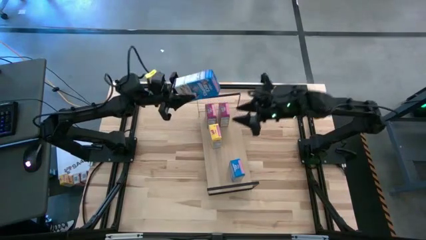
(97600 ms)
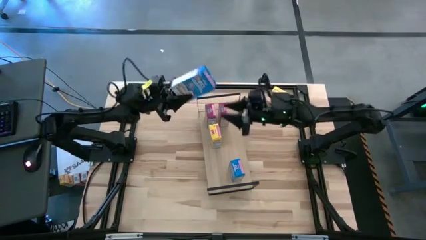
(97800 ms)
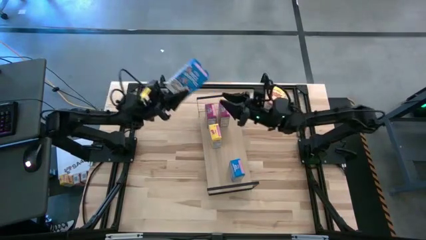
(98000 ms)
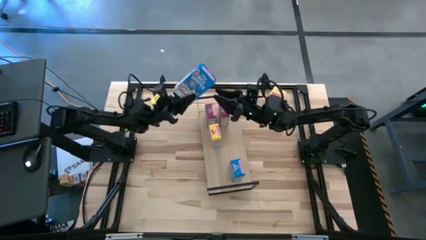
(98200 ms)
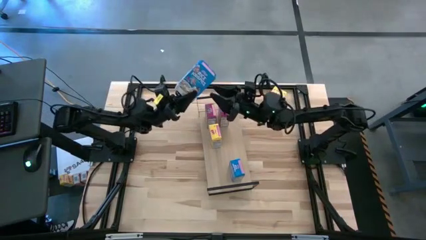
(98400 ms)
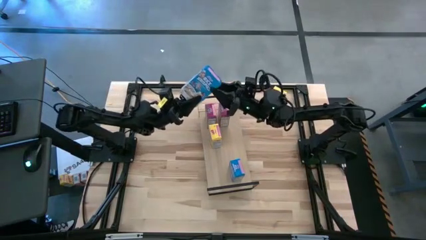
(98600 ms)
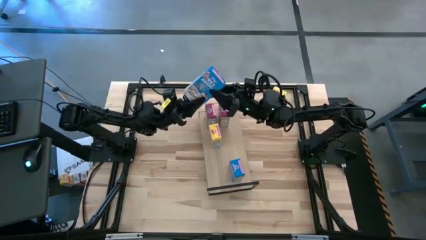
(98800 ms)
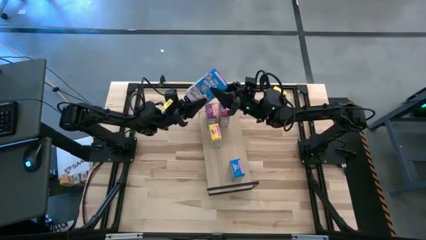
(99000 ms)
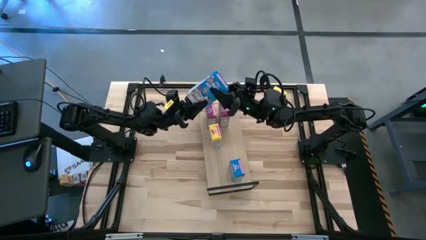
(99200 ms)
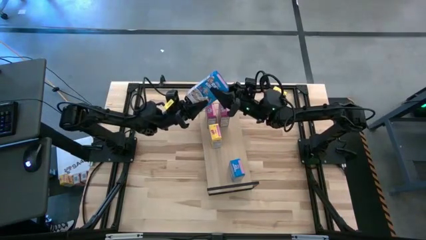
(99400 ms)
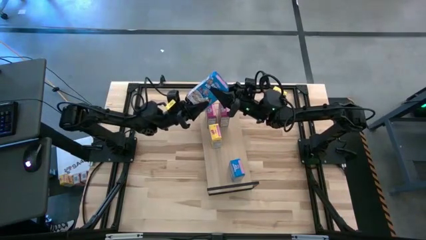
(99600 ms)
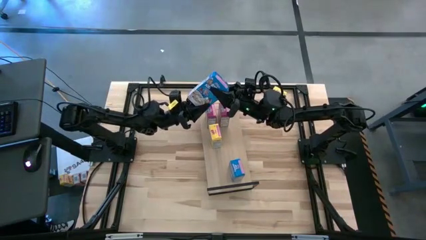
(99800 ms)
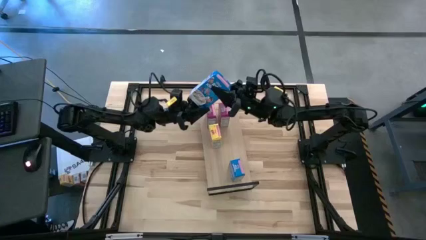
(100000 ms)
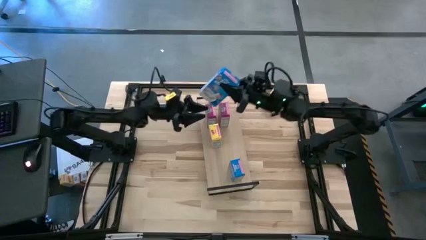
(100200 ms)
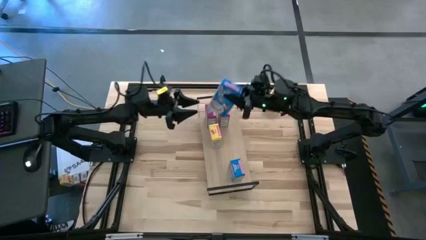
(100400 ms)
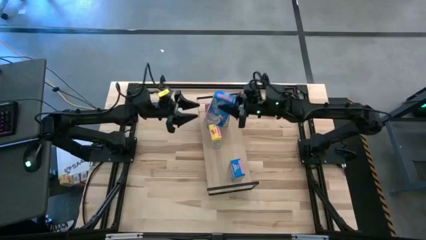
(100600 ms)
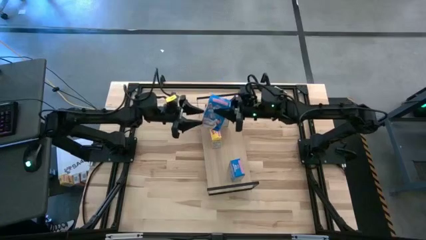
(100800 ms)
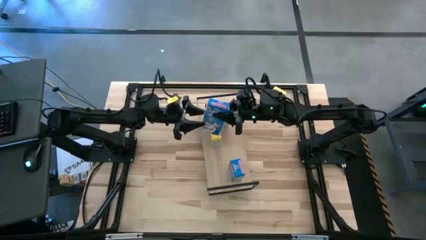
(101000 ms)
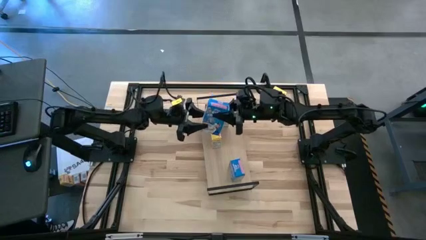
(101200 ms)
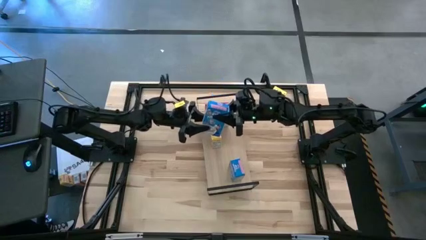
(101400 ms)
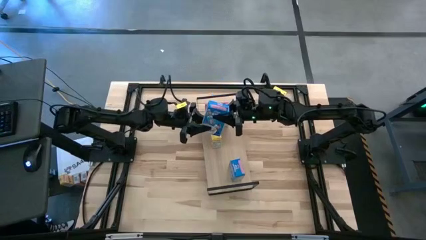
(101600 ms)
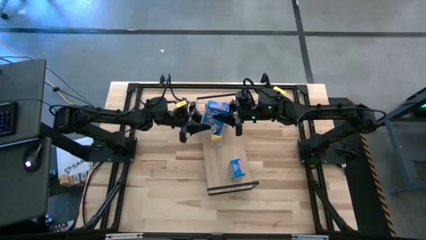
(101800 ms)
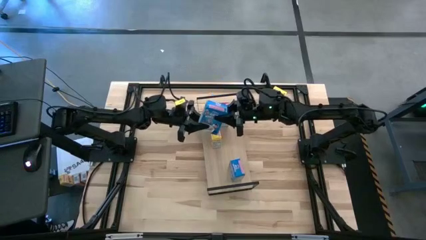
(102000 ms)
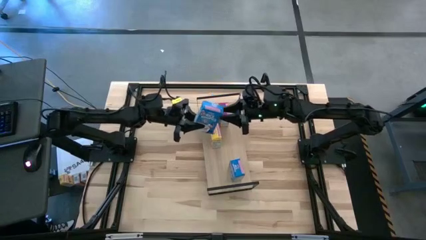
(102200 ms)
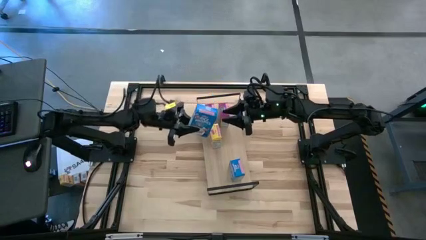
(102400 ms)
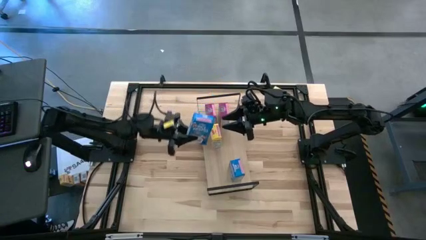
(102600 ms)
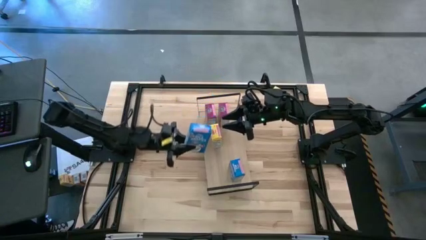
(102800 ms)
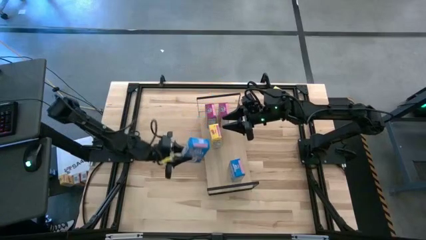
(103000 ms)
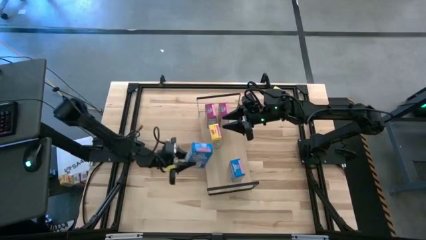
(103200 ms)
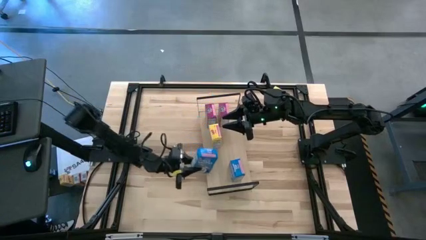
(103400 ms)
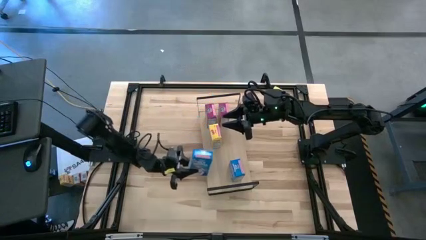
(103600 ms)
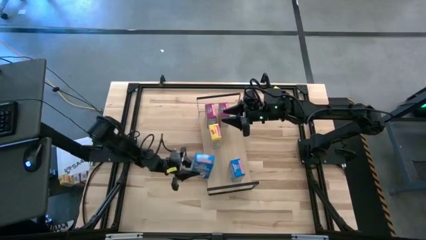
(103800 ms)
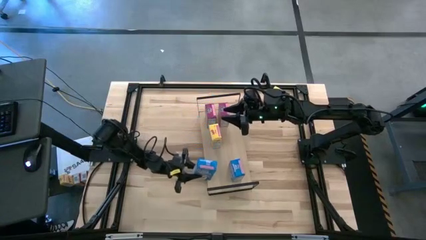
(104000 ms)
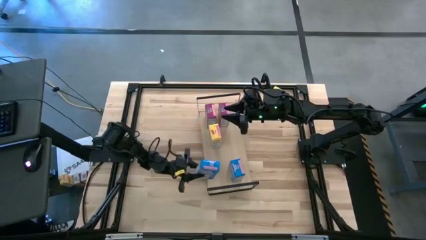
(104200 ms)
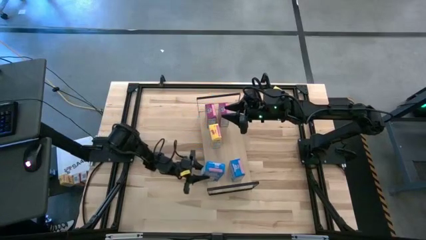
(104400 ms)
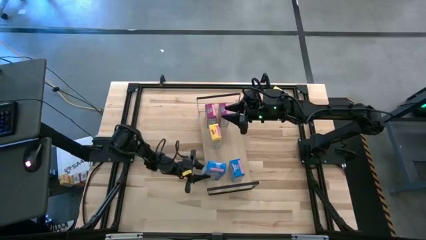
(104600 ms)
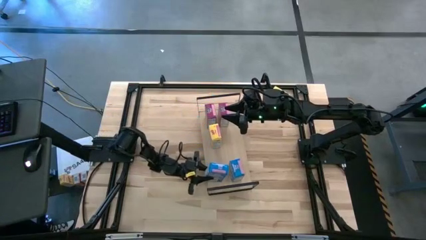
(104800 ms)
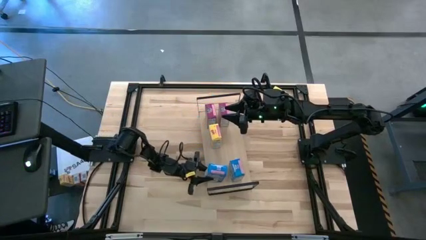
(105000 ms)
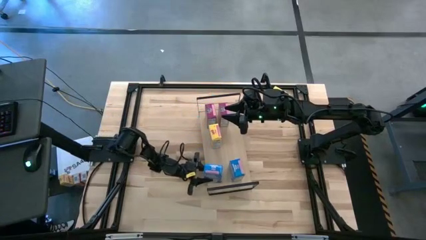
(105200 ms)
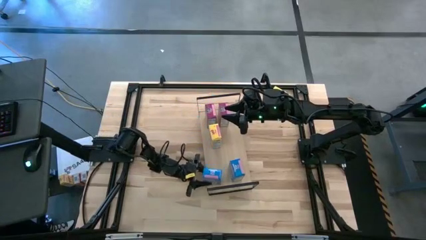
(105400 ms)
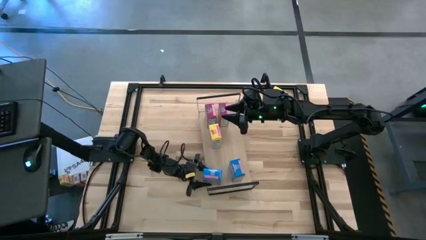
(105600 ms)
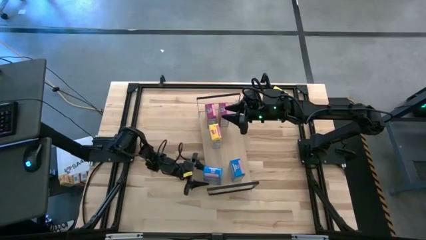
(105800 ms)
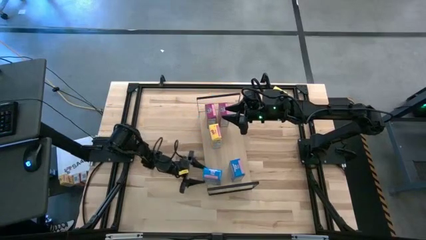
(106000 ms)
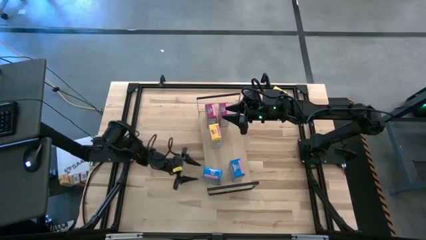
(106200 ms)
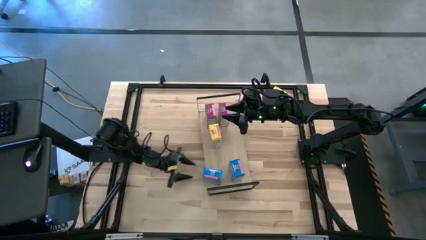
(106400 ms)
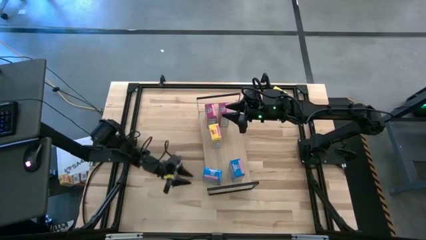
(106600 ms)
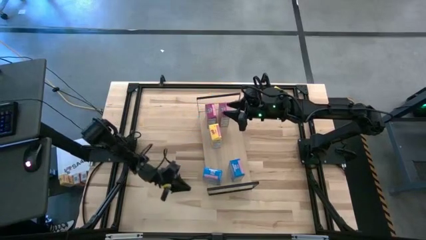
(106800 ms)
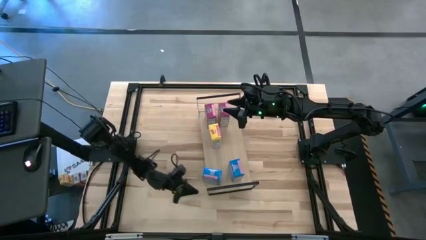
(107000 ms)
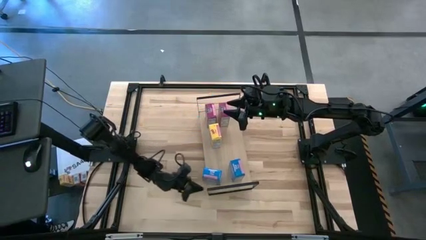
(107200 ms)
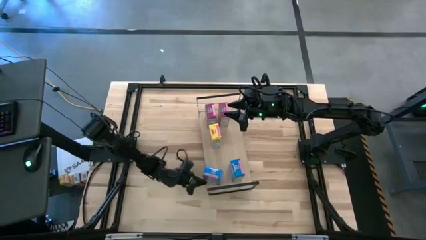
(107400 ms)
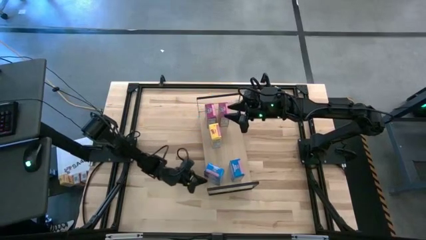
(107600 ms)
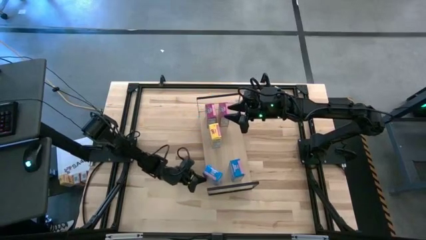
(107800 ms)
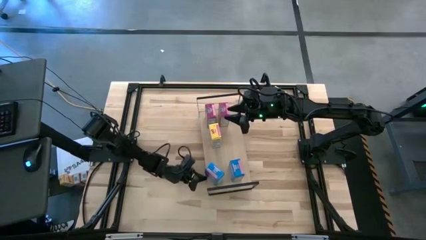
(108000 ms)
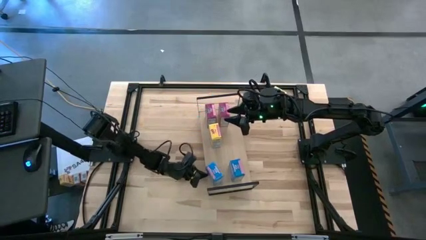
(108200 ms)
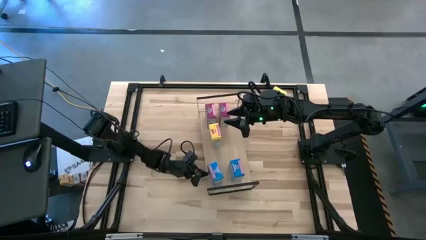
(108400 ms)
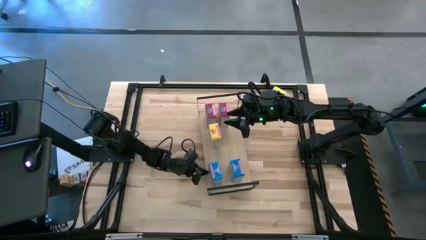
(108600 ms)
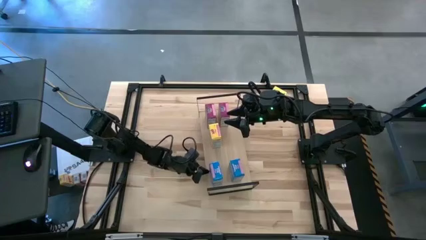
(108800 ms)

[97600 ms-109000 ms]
Task: Stack cereal on shelf
Put the blue cereal box on the shelf aligned with the other blue cereal box
